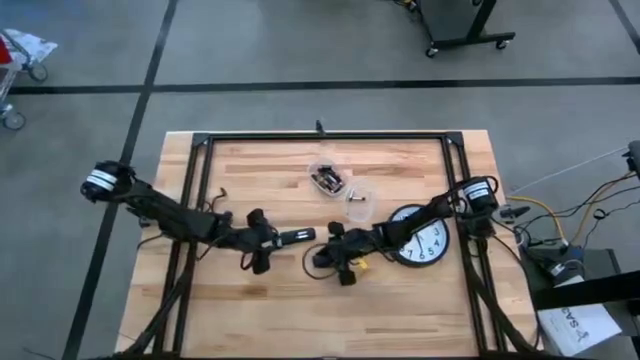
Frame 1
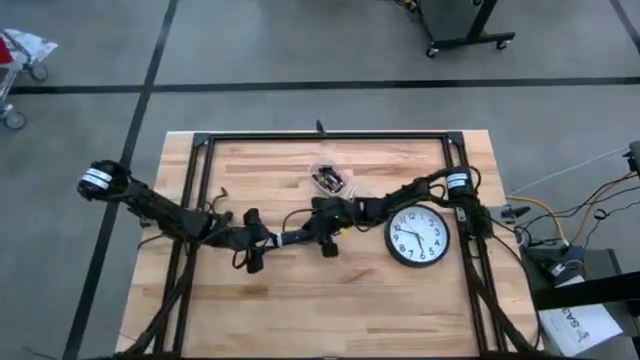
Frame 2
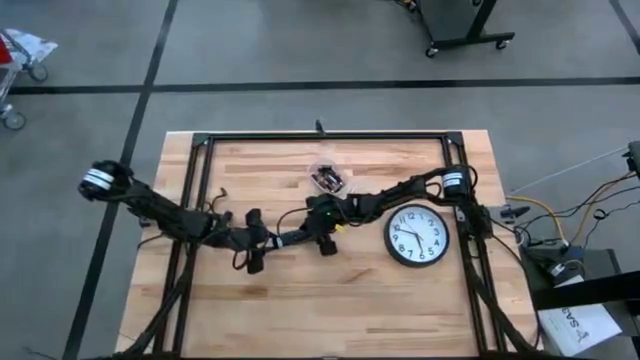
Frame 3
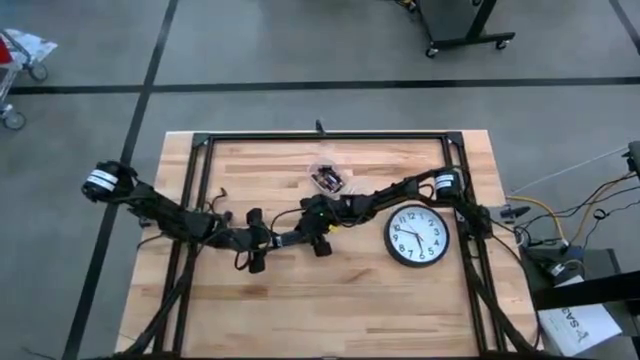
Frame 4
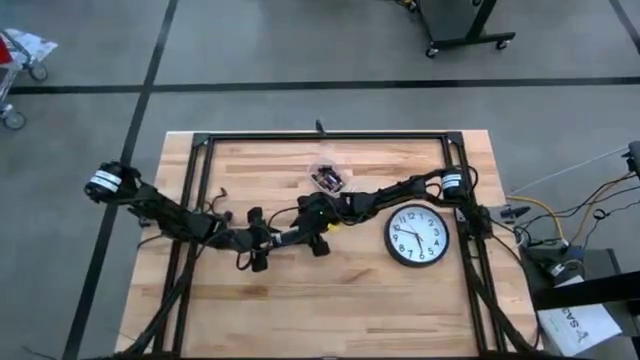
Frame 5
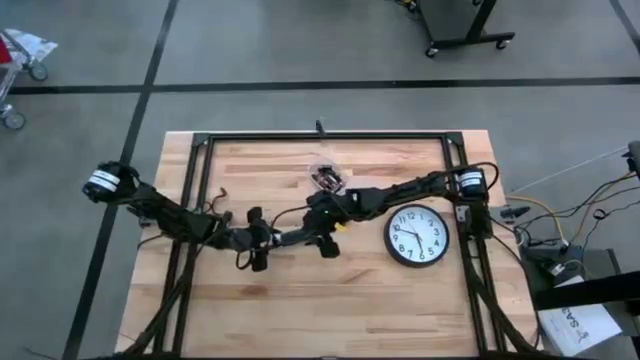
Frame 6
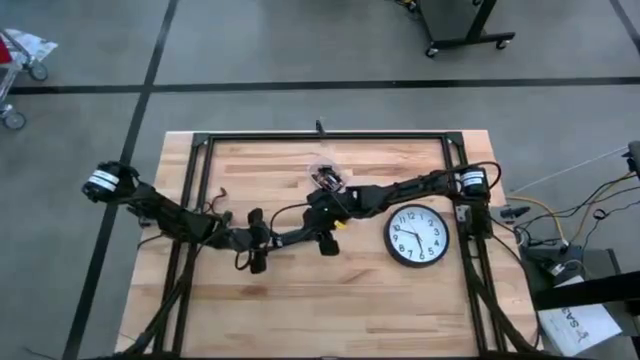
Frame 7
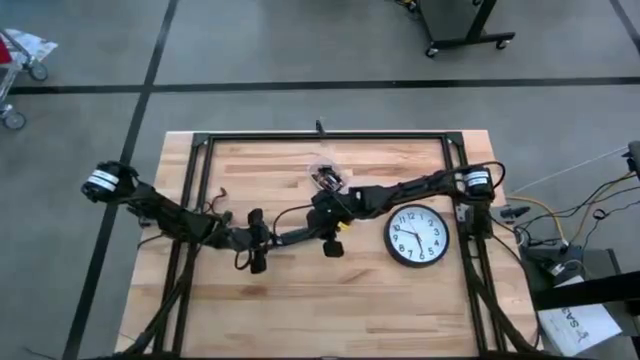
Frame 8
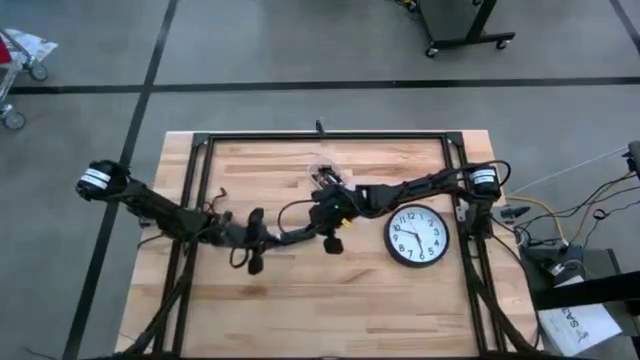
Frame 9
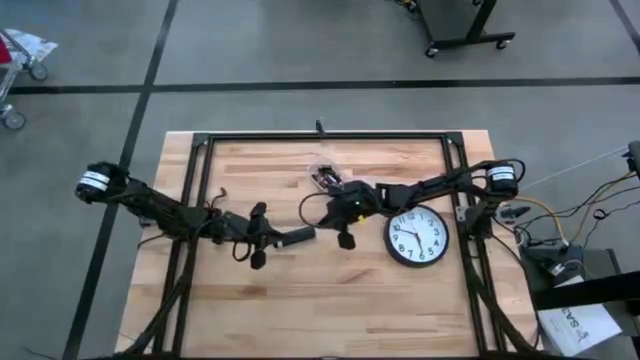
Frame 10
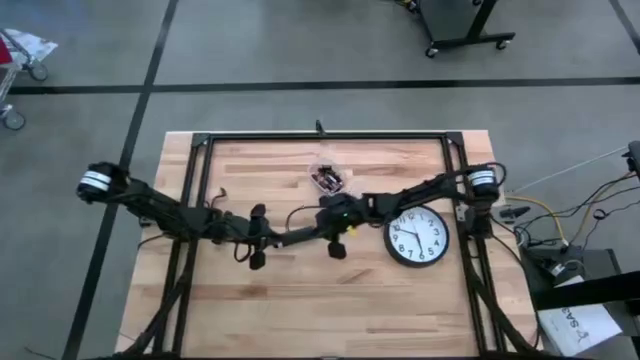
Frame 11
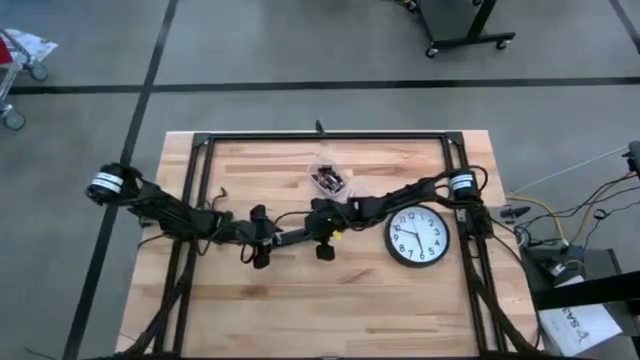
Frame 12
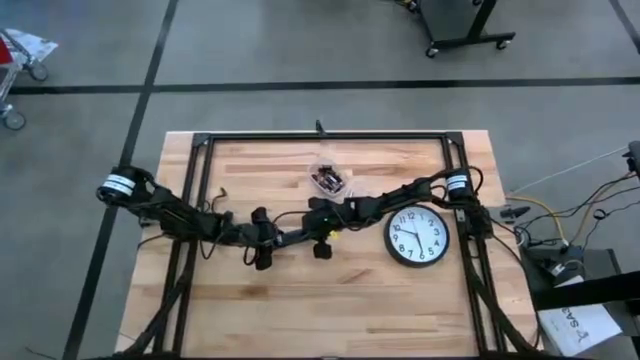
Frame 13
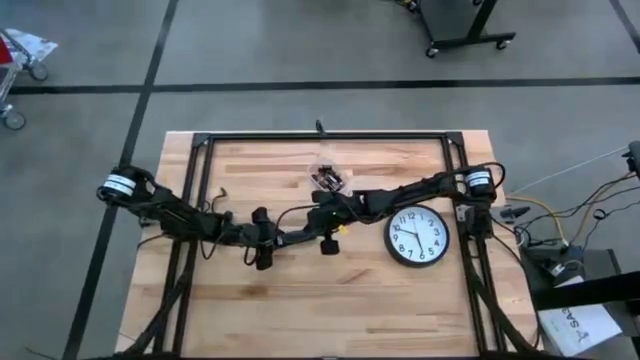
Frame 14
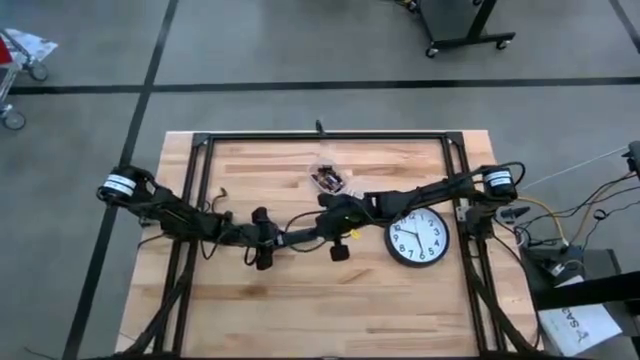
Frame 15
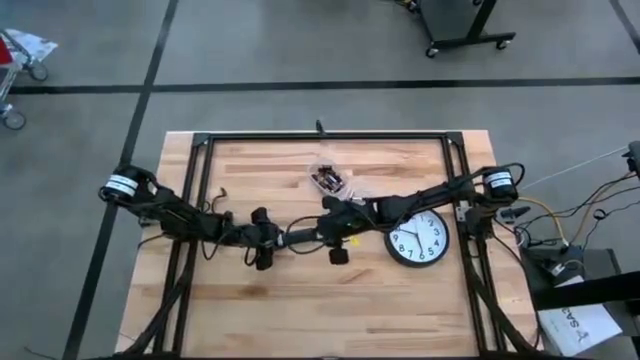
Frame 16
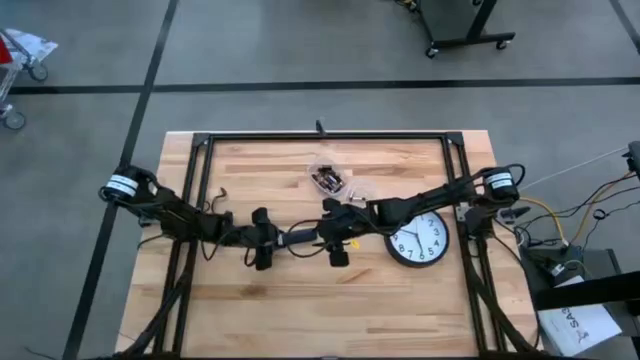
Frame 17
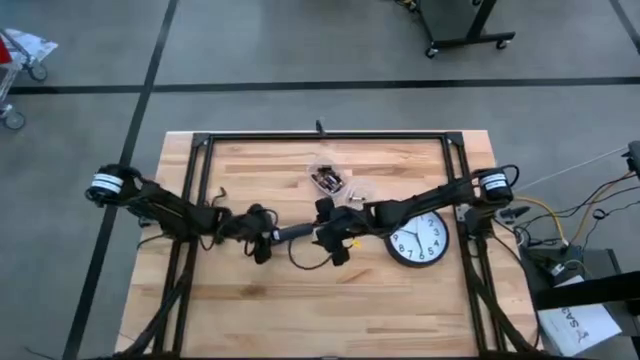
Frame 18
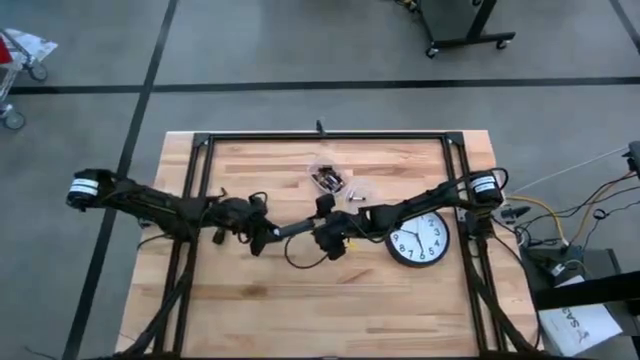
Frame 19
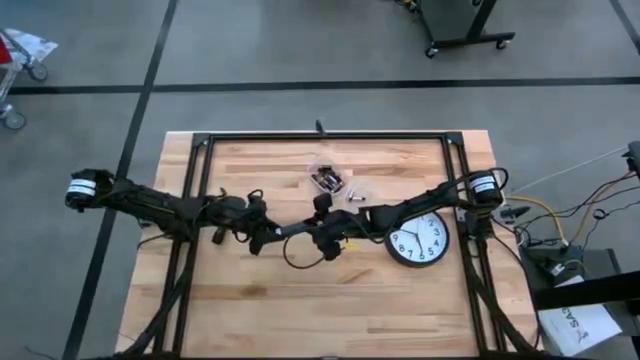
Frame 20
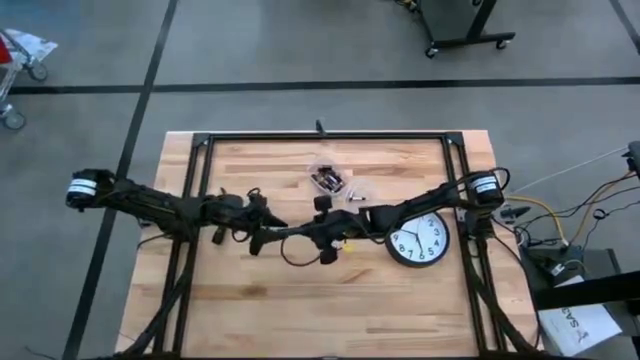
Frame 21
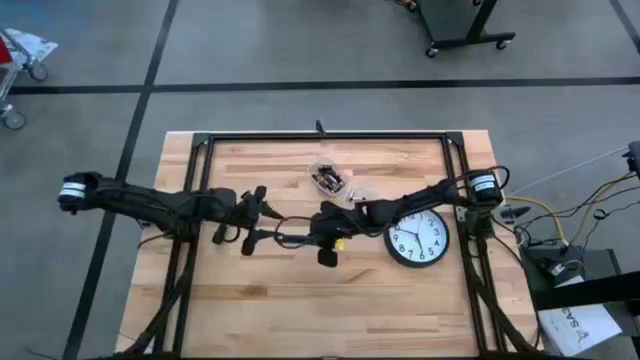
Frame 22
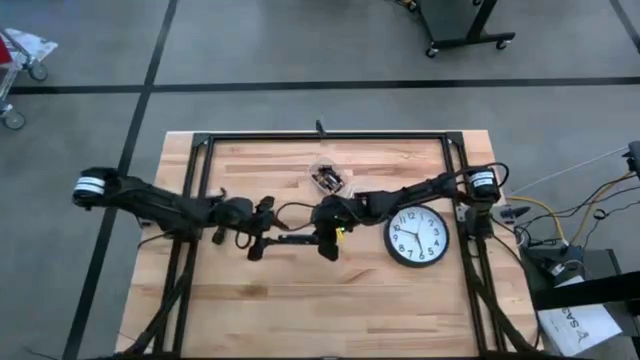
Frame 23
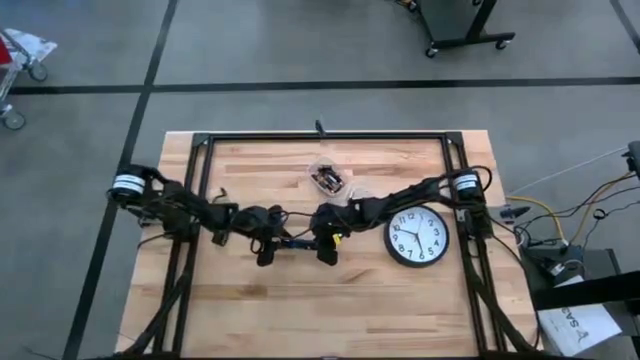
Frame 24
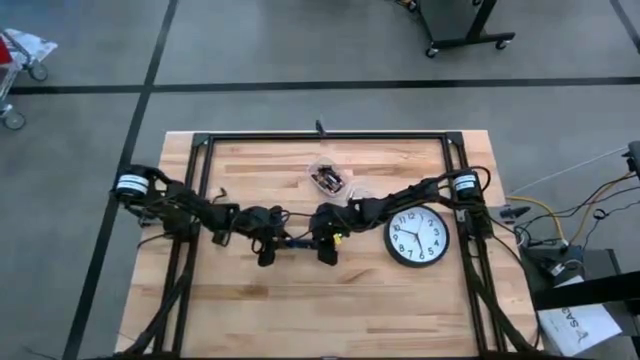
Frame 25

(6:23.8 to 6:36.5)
Task: Insert battery
Close the black remote battery cover

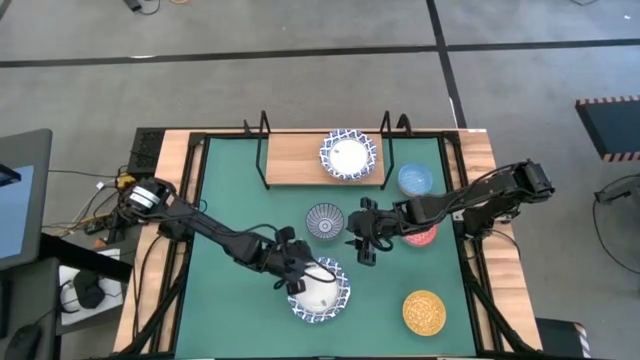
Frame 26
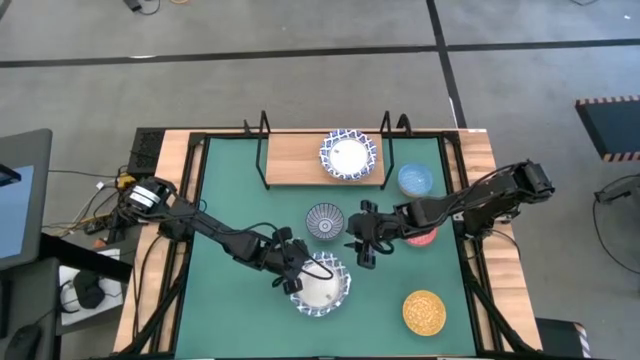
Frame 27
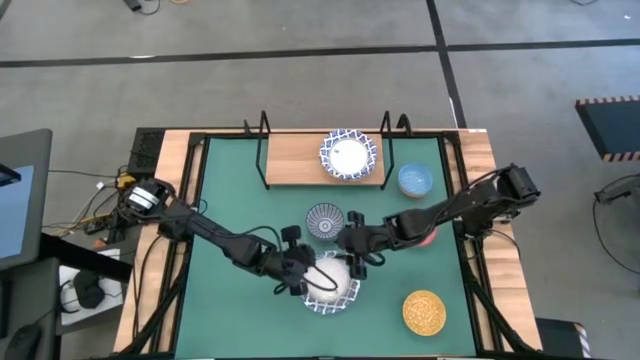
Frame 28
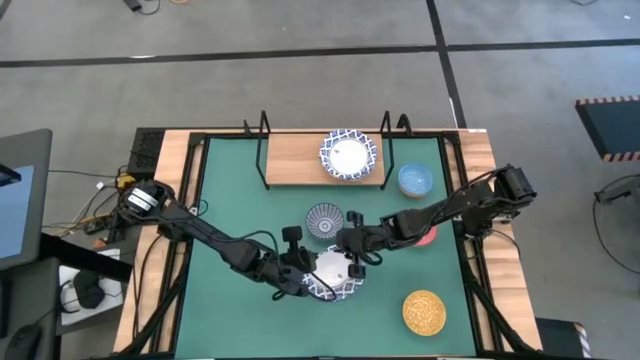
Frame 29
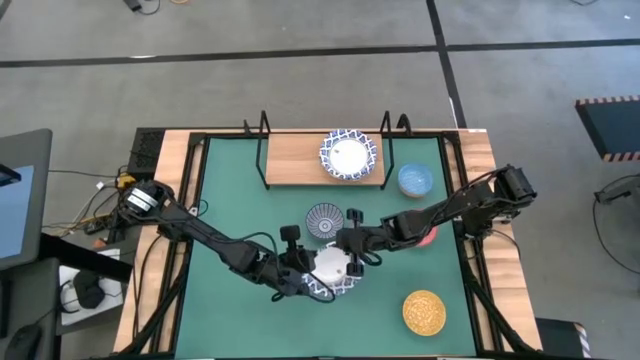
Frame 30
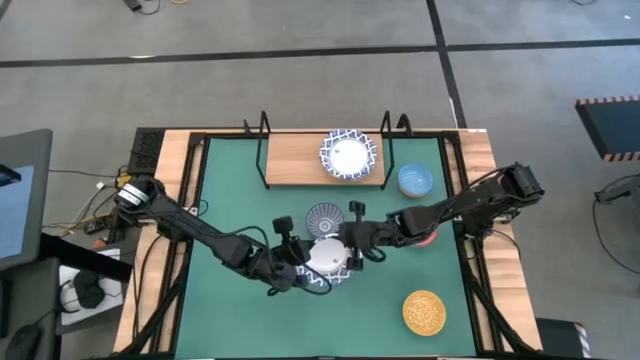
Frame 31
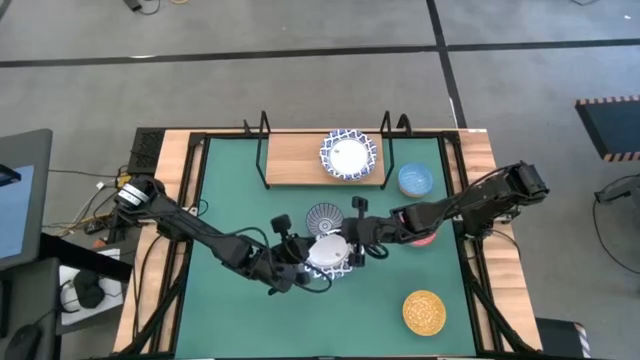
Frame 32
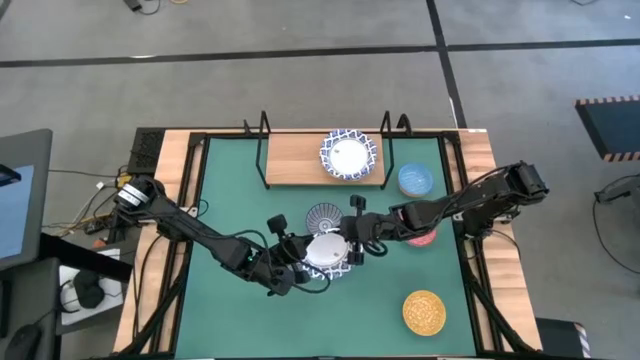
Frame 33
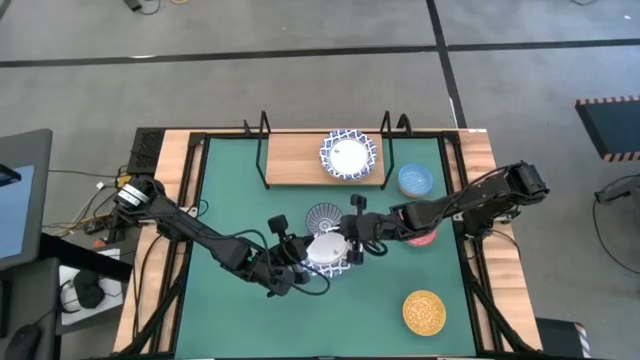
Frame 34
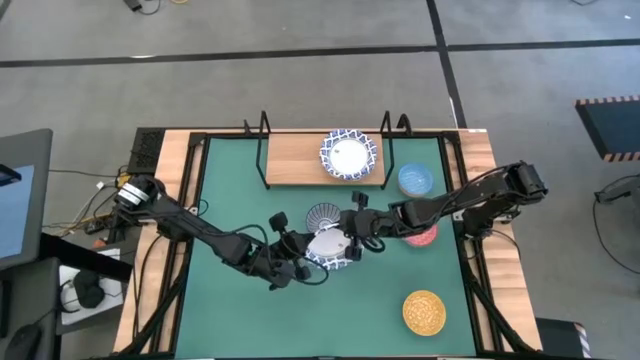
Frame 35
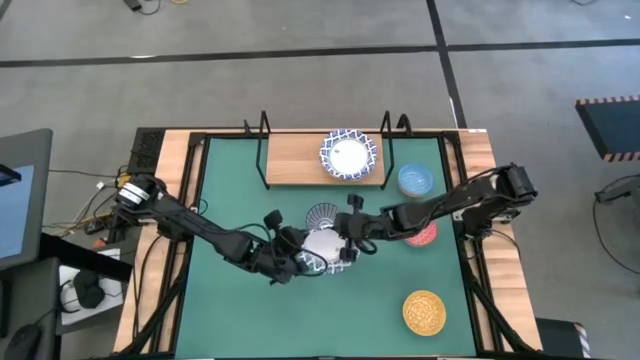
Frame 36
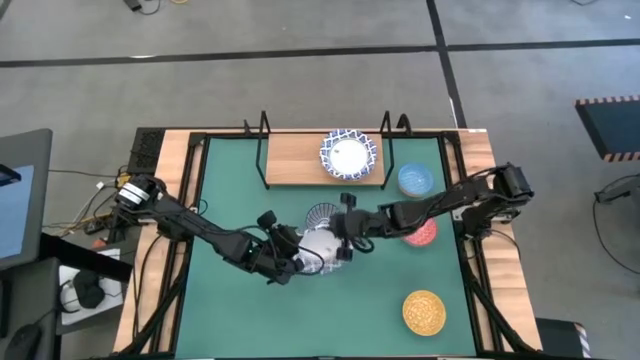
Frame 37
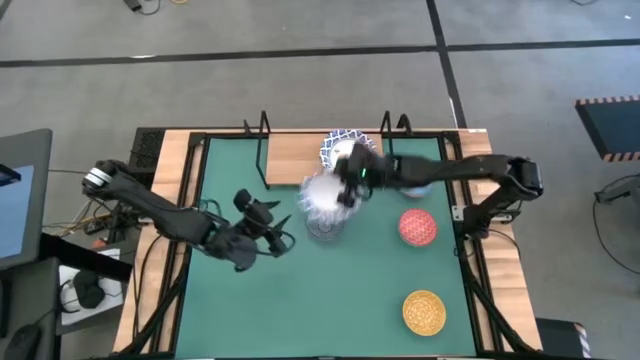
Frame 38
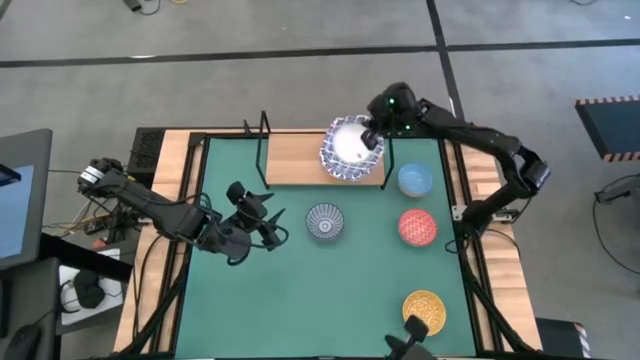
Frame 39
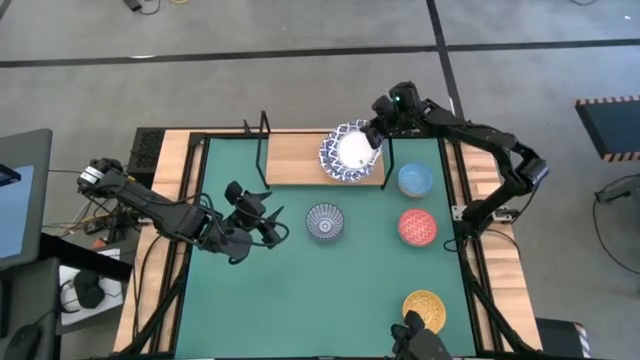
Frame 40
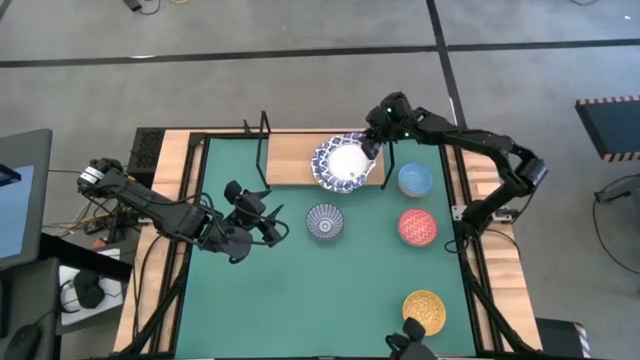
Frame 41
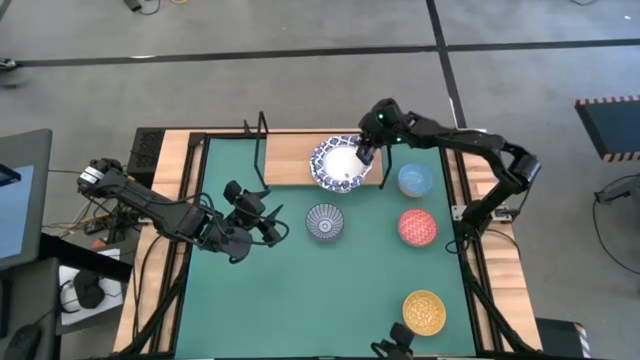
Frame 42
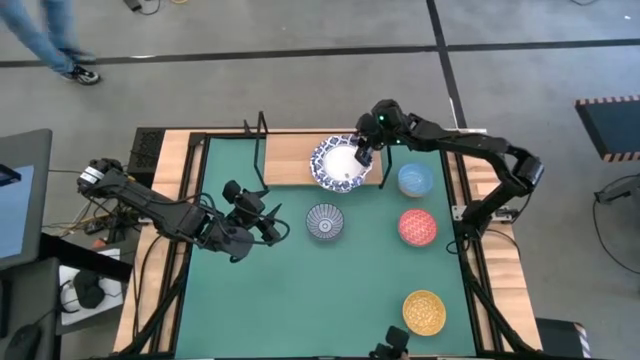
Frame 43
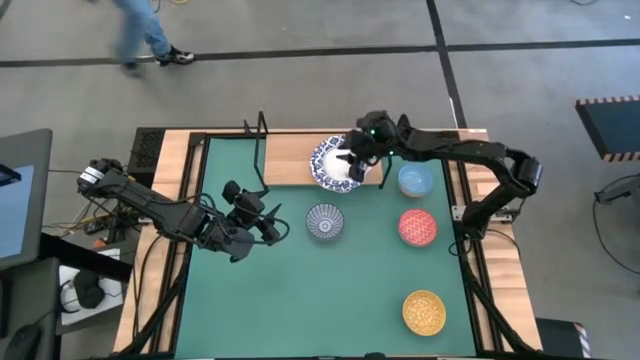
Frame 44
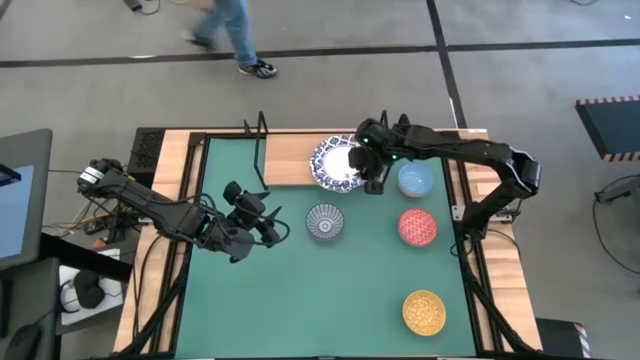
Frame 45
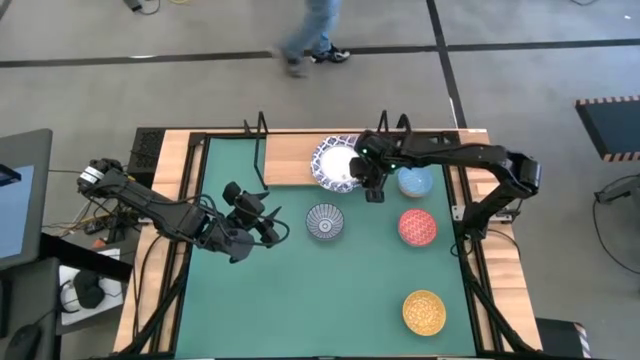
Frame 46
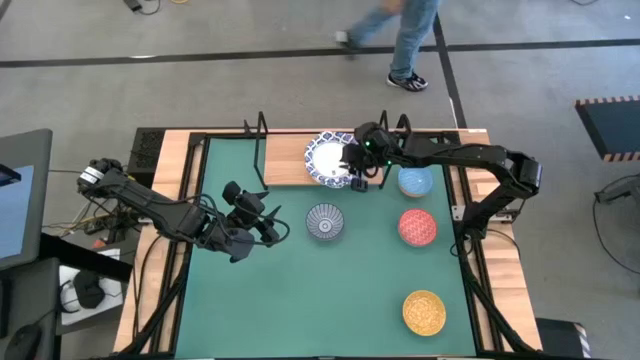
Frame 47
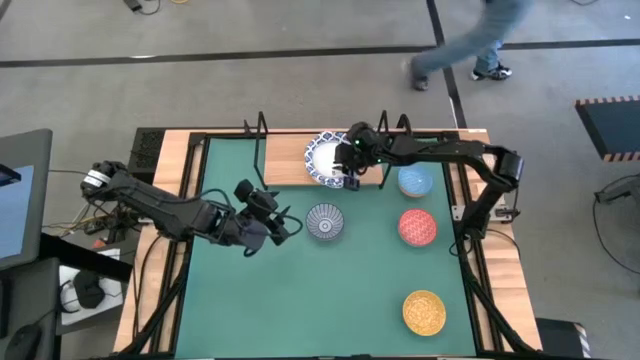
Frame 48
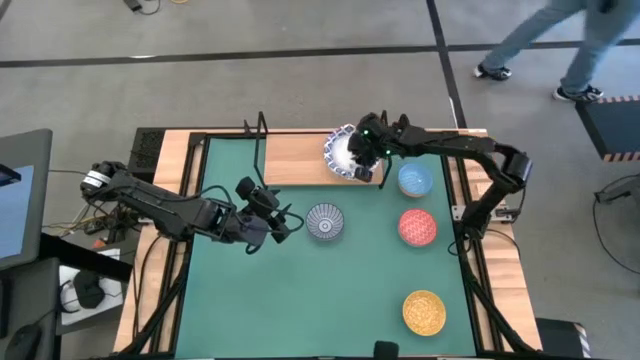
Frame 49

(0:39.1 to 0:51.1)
Task: Place and stack bowls onto a shelf
Stack the white bowl on top of the other white bowls on the shelf
